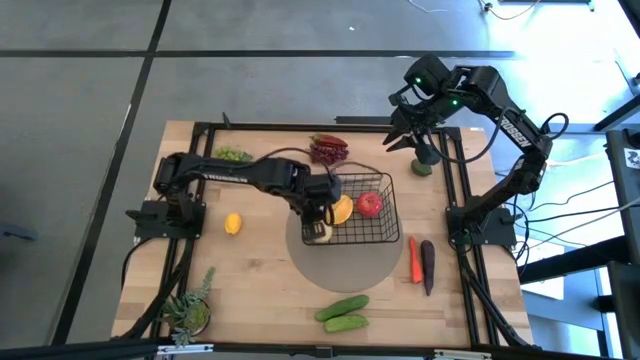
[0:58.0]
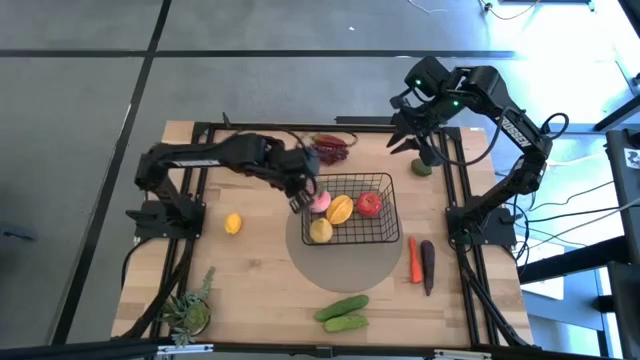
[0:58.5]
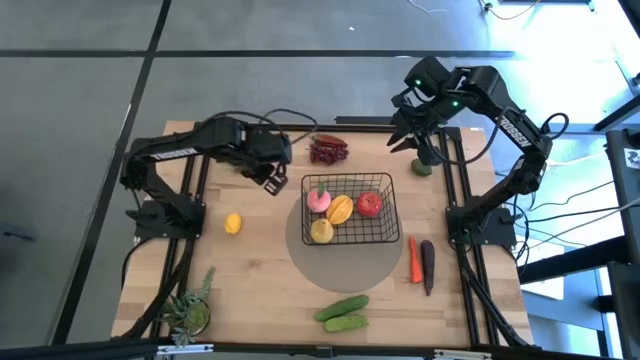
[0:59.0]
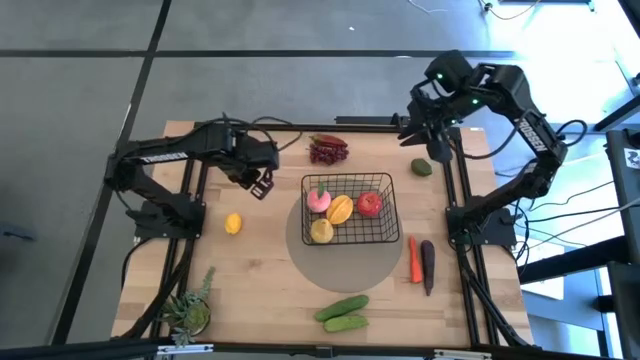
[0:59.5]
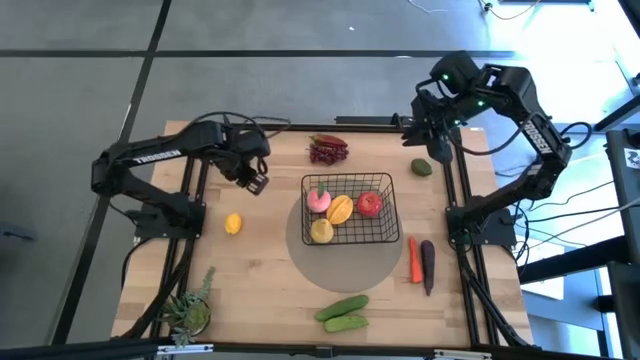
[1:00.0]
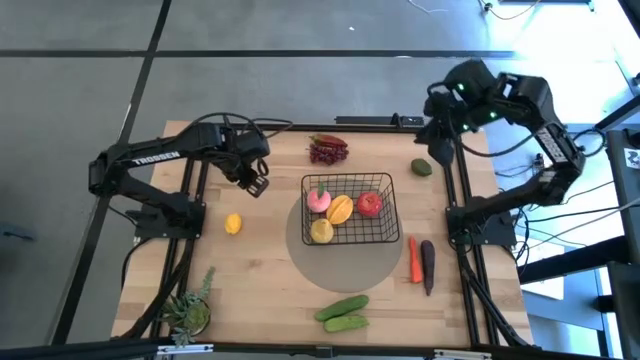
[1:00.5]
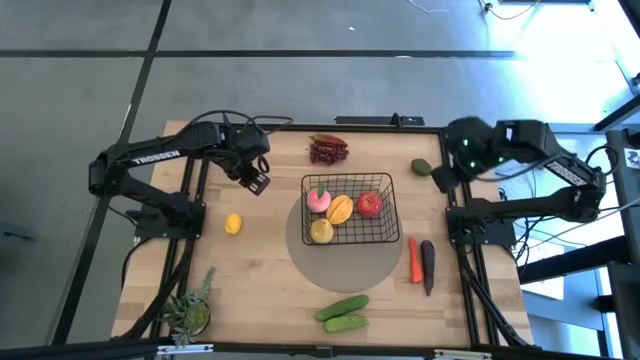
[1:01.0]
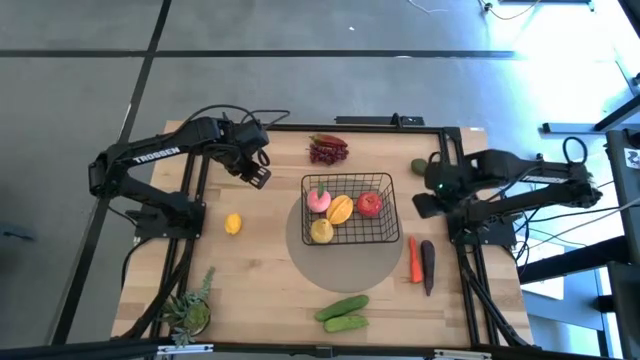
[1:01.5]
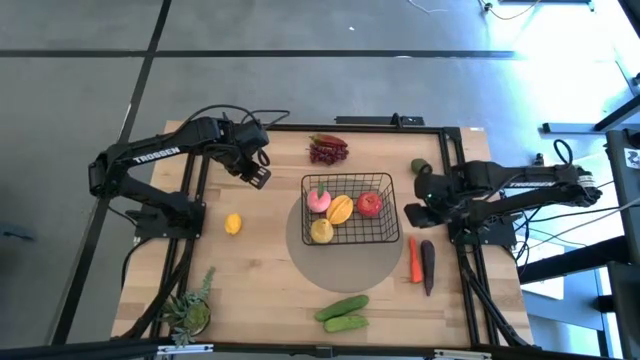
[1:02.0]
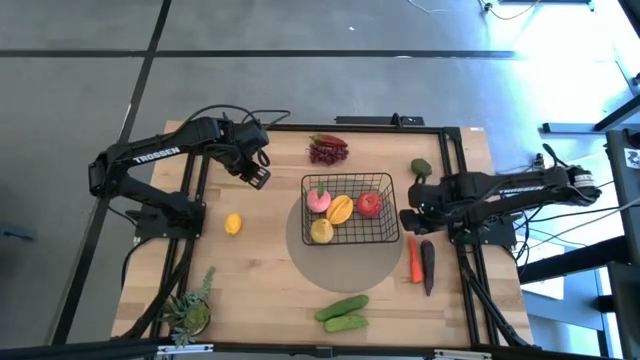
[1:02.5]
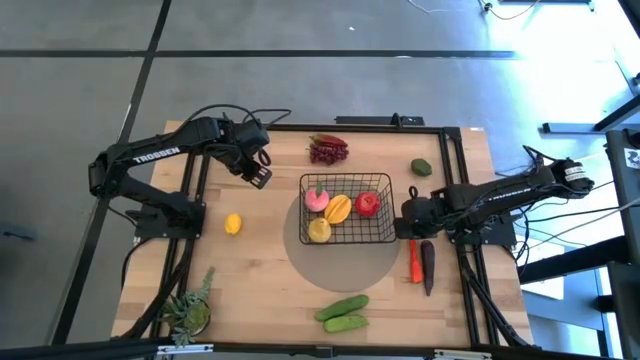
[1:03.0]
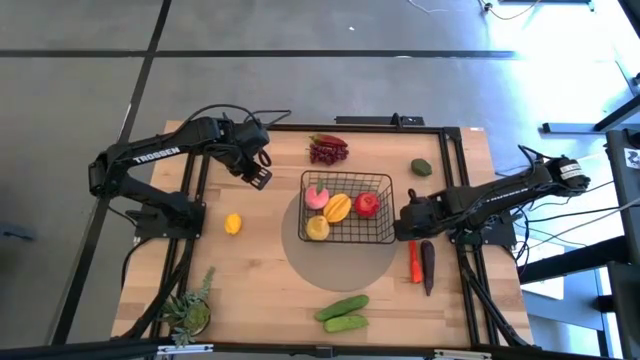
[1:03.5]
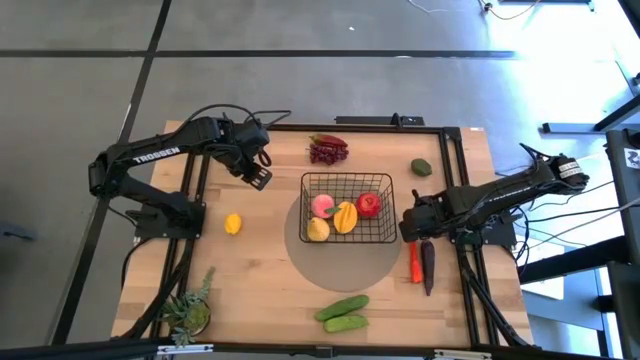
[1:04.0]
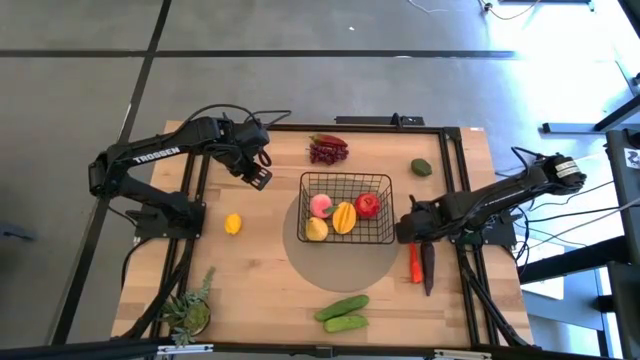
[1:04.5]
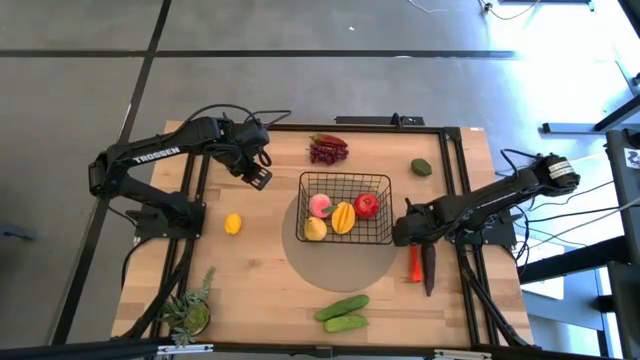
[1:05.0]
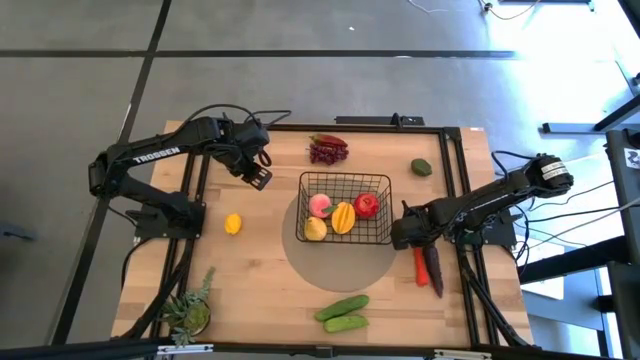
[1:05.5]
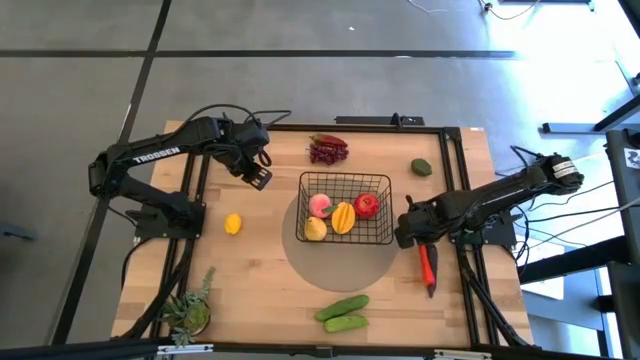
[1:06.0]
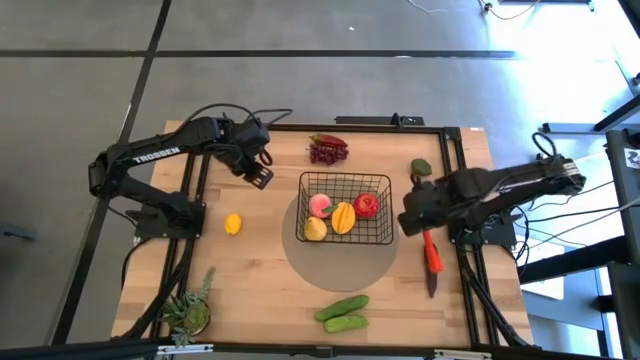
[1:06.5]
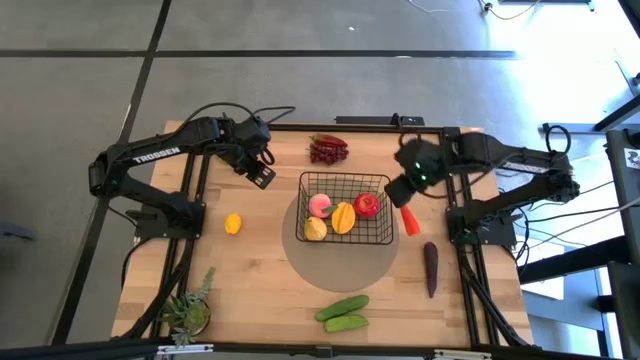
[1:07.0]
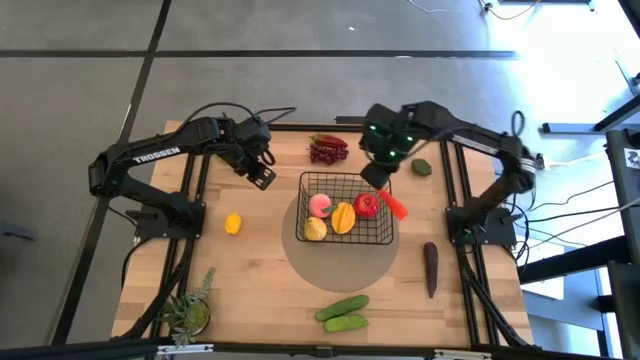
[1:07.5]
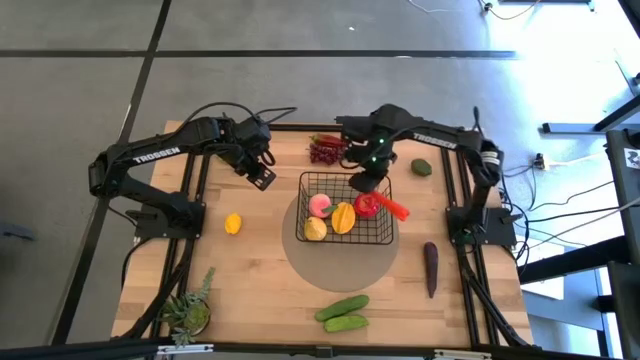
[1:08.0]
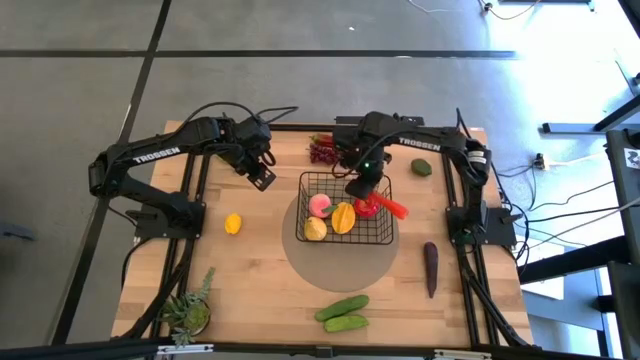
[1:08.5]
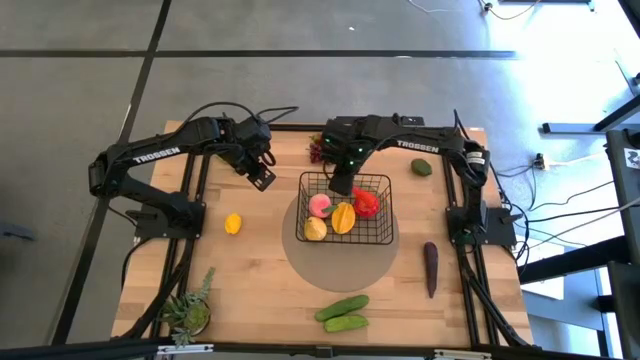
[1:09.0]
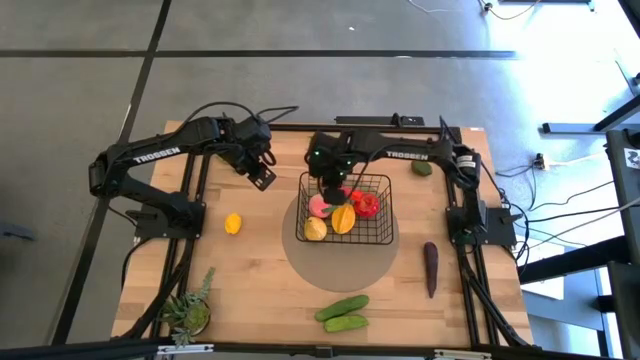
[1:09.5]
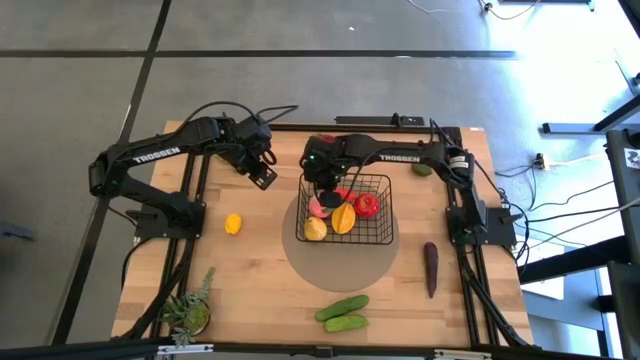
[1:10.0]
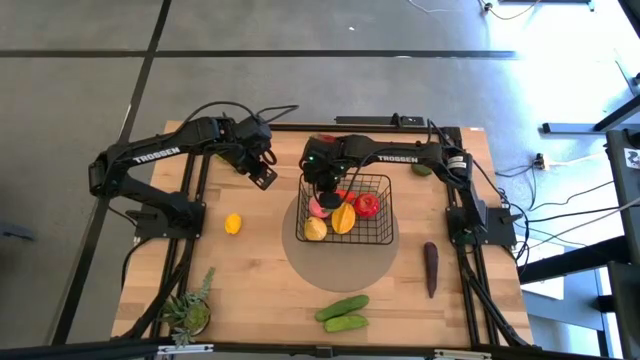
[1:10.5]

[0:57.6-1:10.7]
Task: Build produce basket
Put the orange carrot into the black wire basket

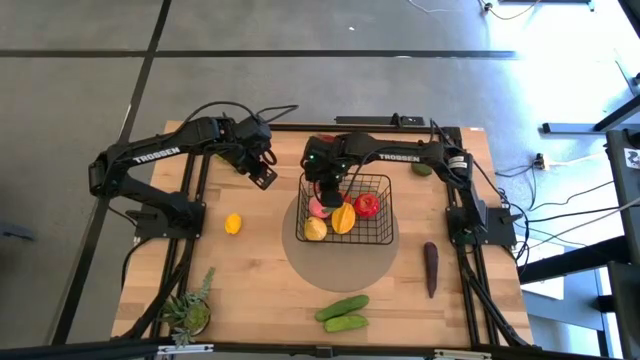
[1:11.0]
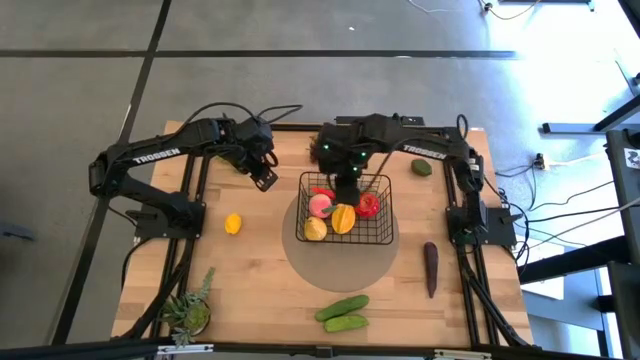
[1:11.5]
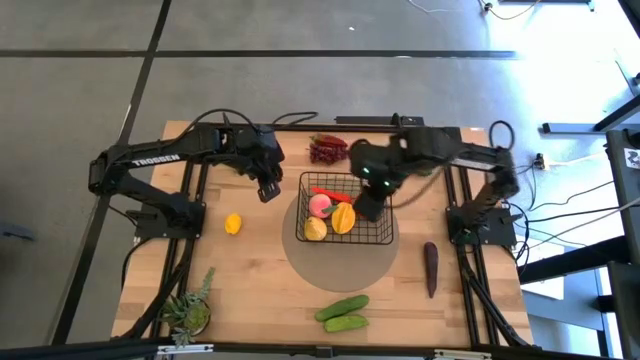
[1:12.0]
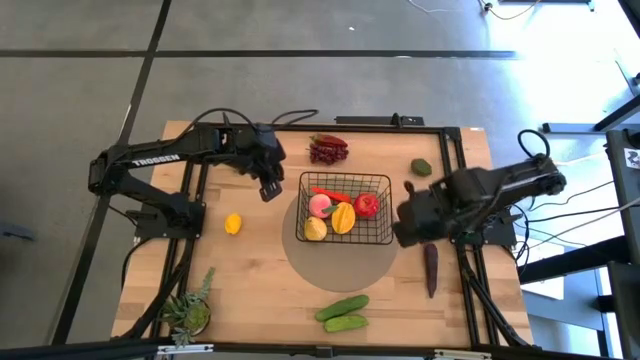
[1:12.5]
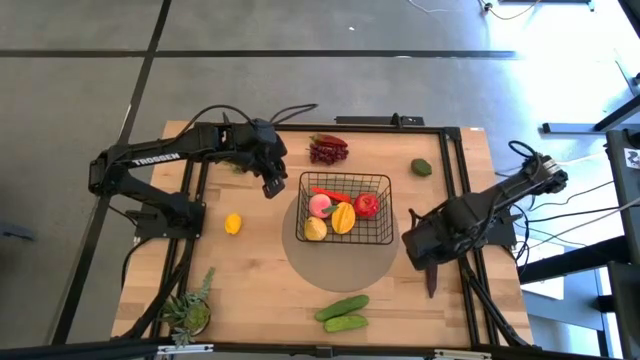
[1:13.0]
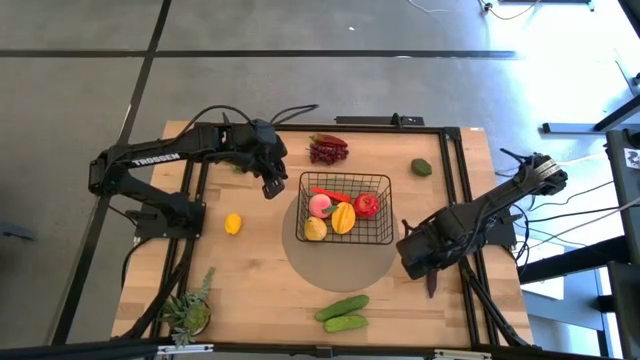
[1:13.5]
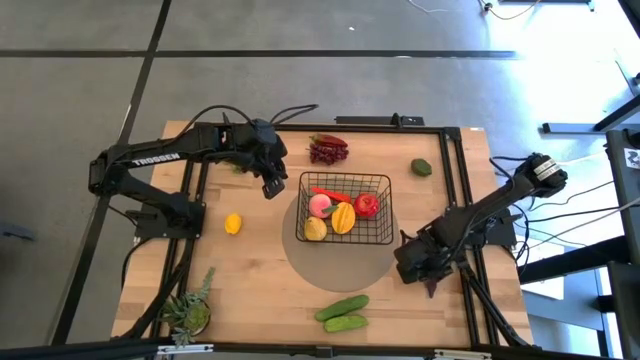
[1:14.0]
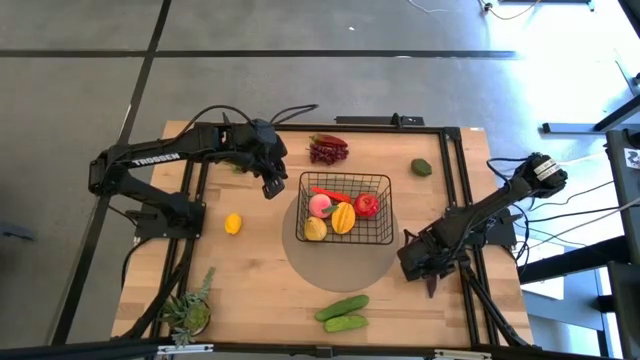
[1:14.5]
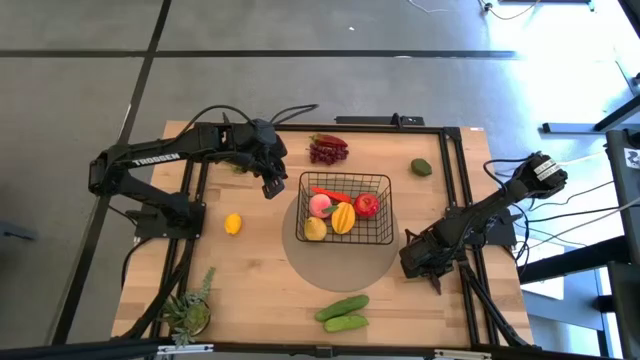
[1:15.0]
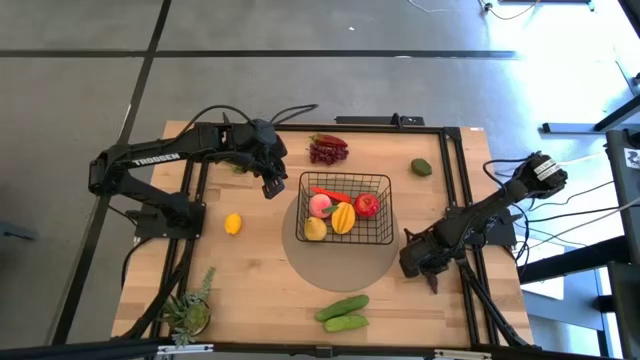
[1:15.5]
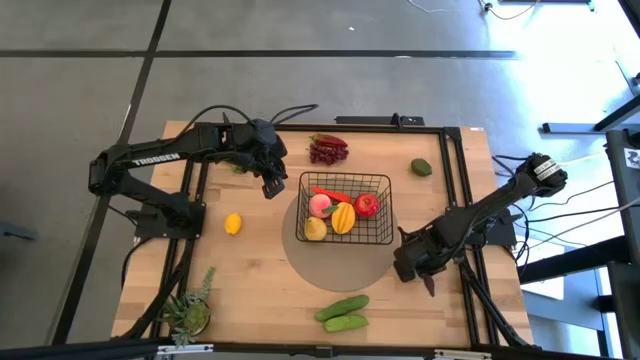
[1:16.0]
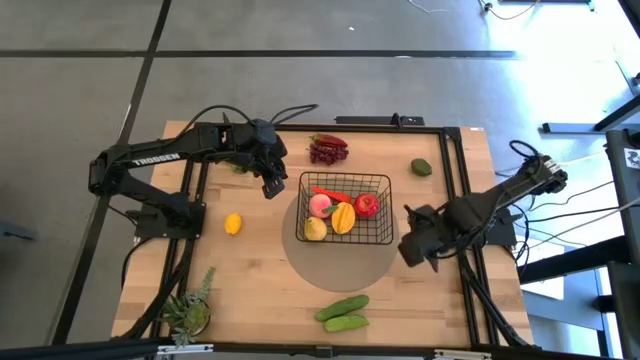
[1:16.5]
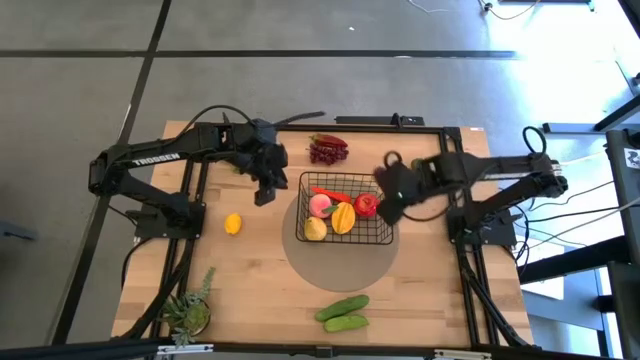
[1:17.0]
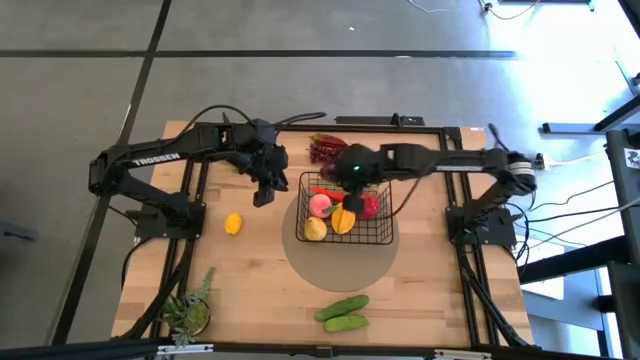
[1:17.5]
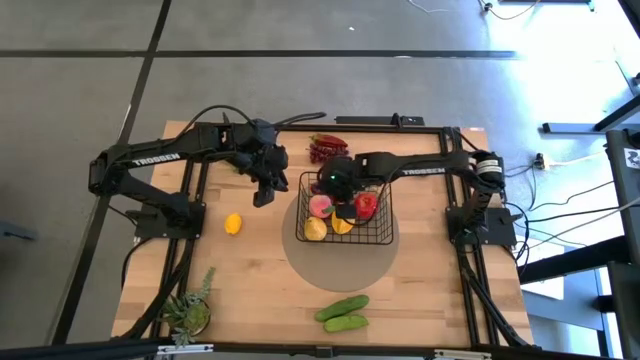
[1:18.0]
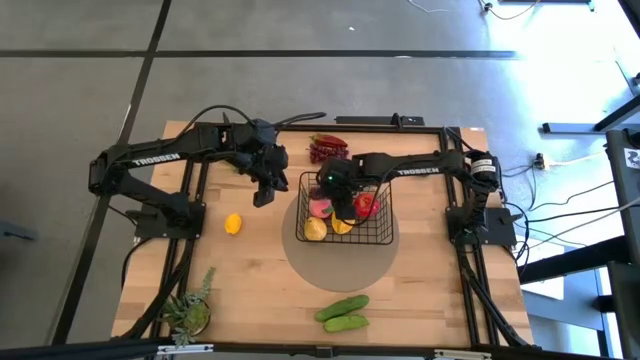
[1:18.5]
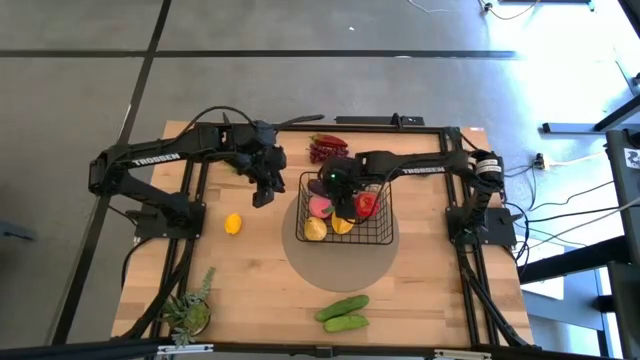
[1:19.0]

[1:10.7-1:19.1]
Put the violet eggplant into the black wire basket
